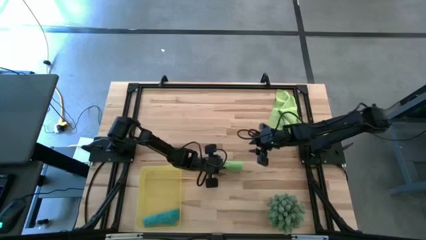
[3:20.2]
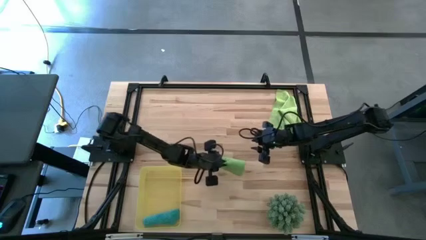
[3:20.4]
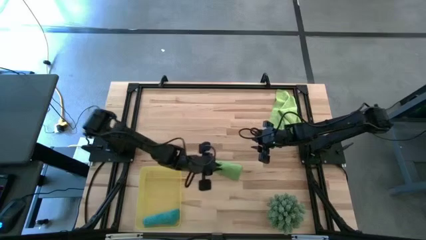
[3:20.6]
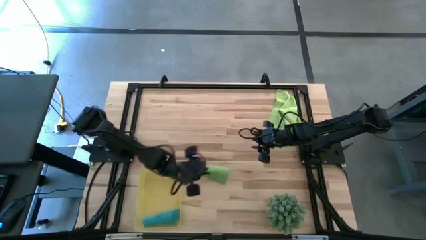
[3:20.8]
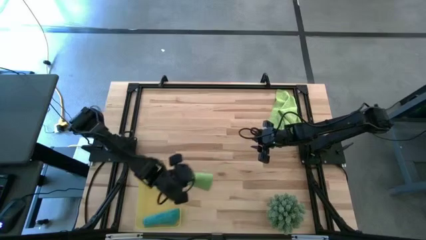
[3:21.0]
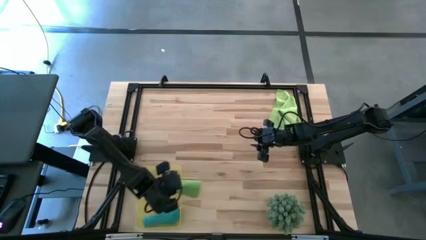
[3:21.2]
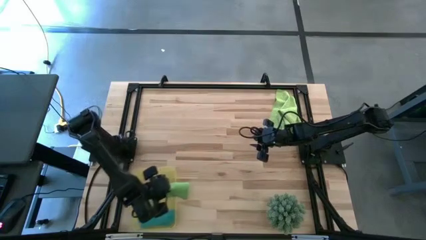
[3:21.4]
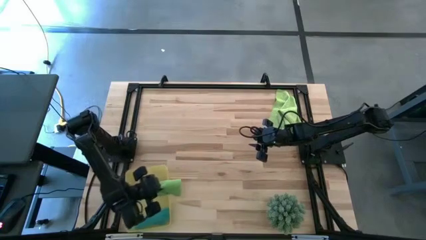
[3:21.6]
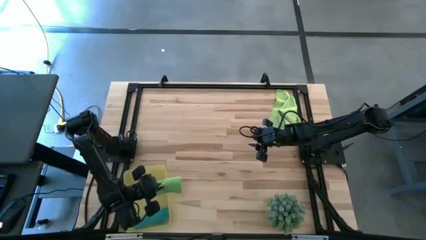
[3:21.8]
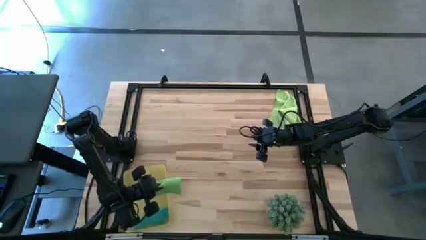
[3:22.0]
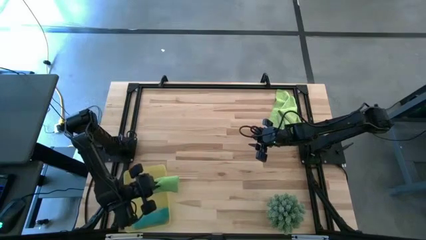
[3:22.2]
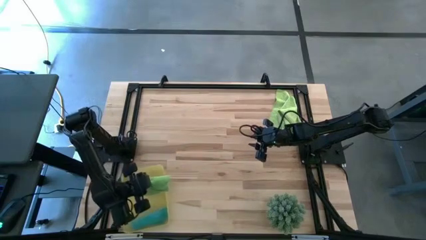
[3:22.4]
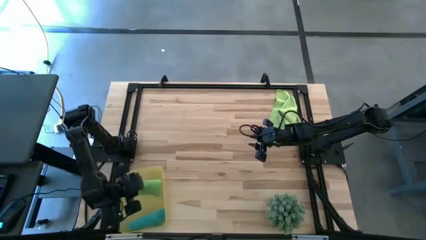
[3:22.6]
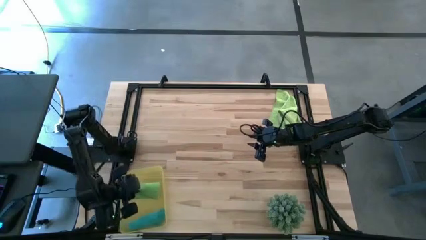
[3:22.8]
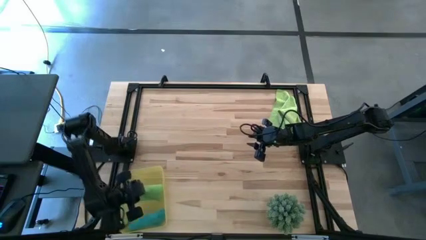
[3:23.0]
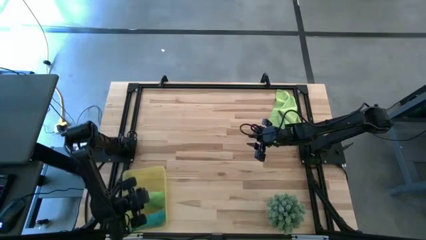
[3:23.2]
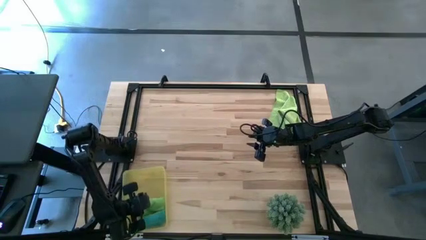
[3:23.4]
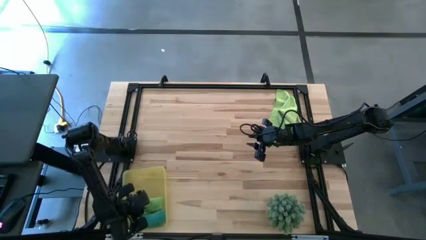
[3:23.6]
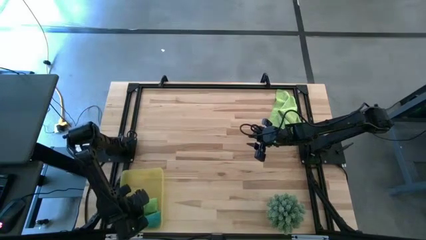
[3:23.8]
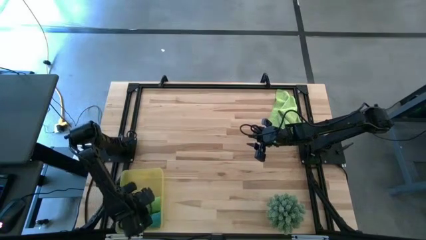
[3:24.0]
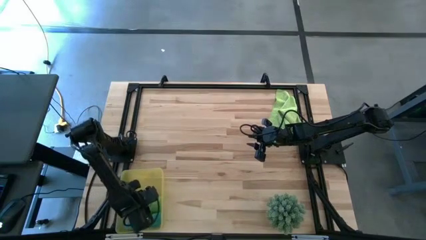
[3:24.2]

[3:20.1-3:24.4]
Task: Roll microfiber towels into tight, uniform cylinder then place into a basket
Put the green microfiber towel into the yellow bin

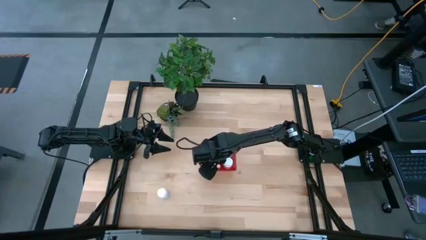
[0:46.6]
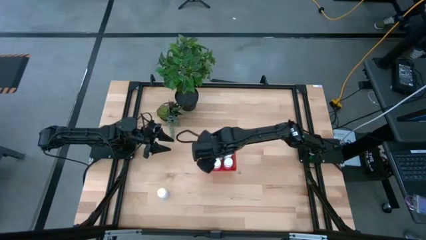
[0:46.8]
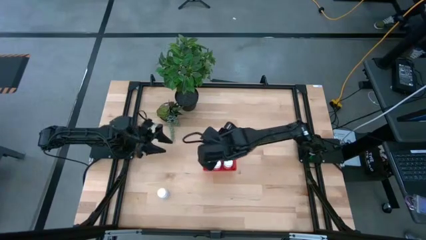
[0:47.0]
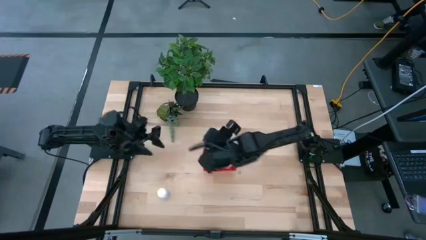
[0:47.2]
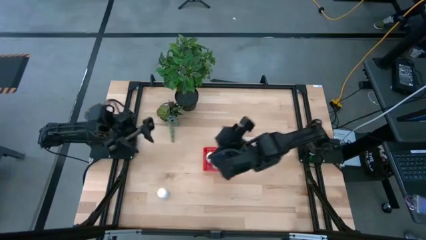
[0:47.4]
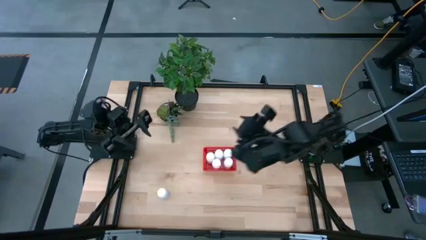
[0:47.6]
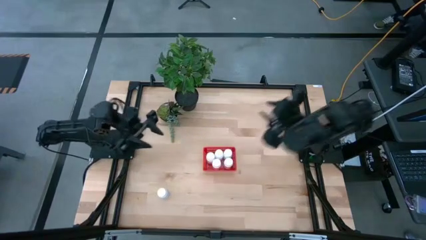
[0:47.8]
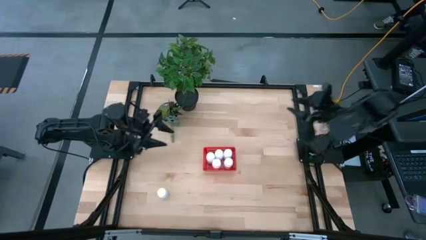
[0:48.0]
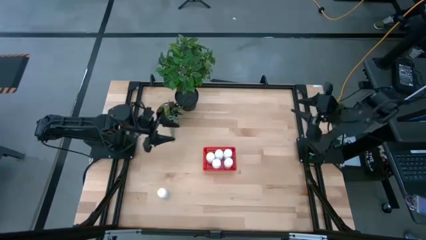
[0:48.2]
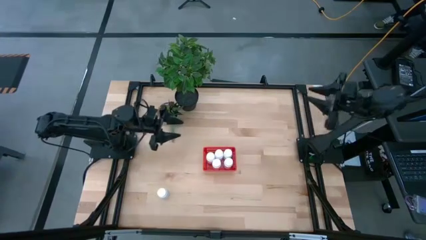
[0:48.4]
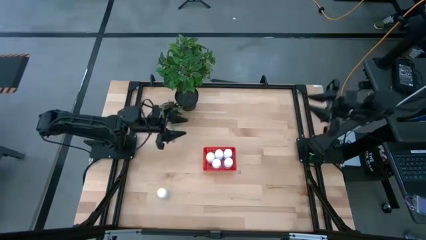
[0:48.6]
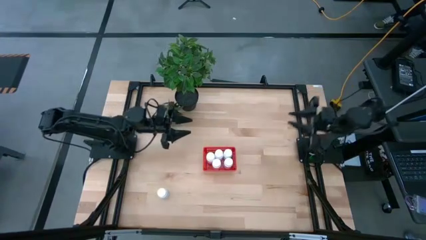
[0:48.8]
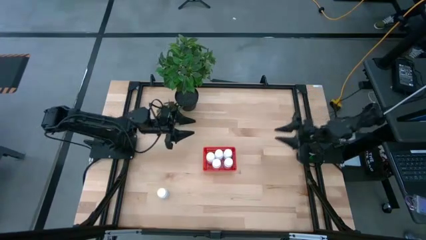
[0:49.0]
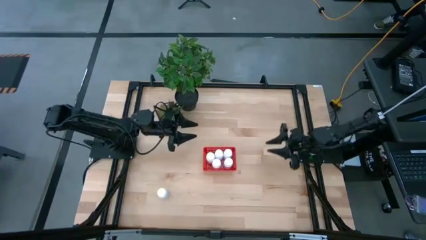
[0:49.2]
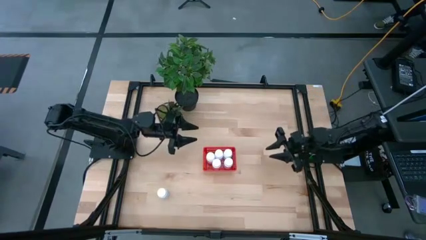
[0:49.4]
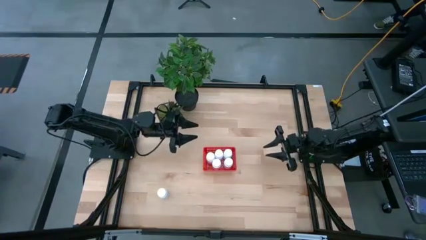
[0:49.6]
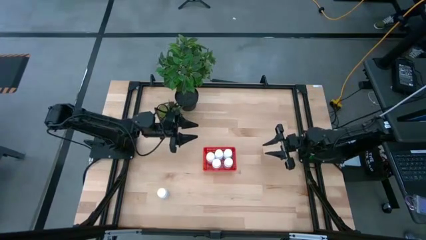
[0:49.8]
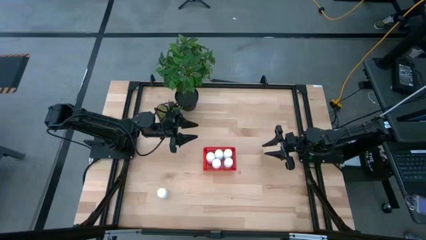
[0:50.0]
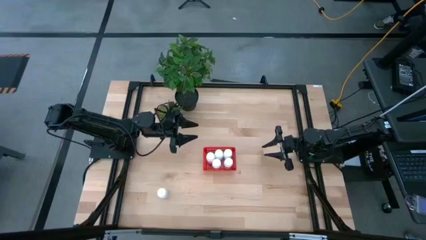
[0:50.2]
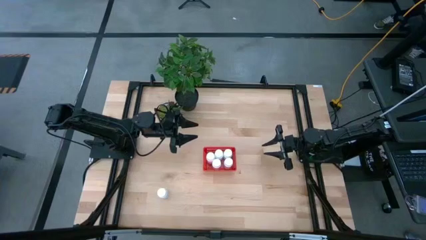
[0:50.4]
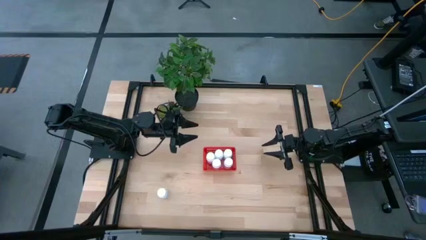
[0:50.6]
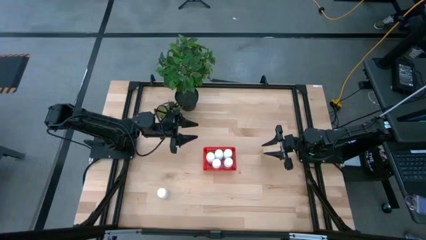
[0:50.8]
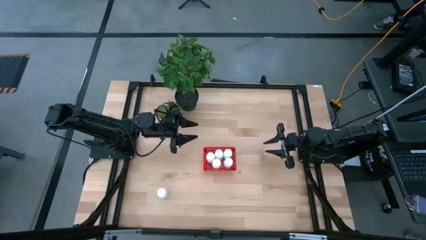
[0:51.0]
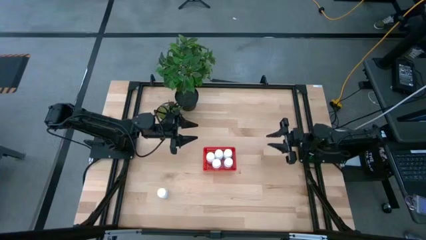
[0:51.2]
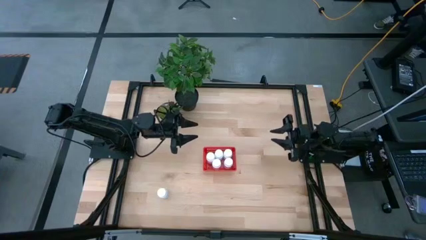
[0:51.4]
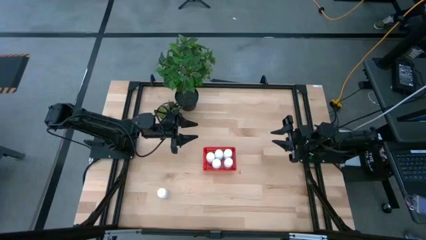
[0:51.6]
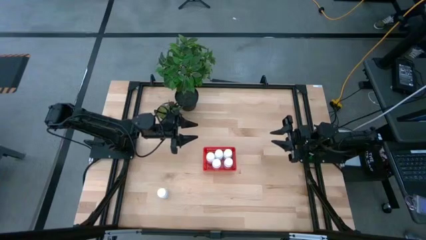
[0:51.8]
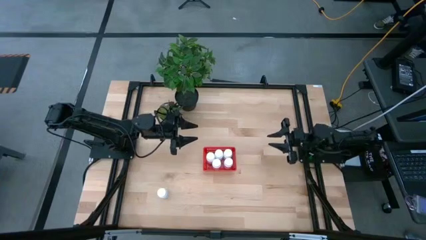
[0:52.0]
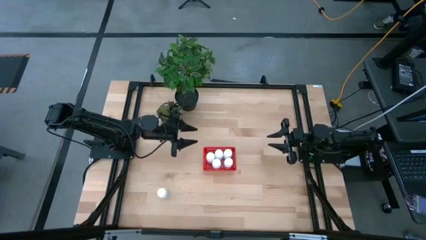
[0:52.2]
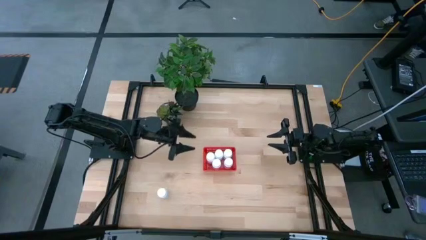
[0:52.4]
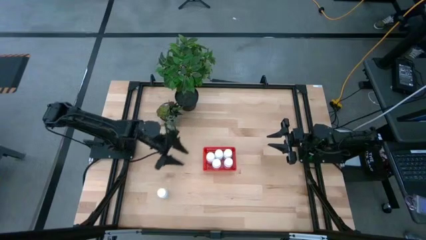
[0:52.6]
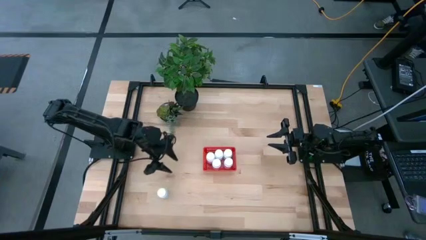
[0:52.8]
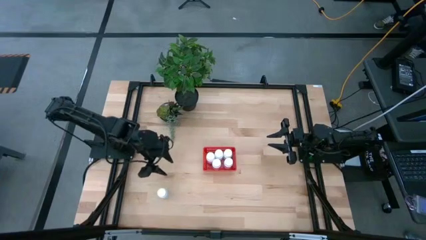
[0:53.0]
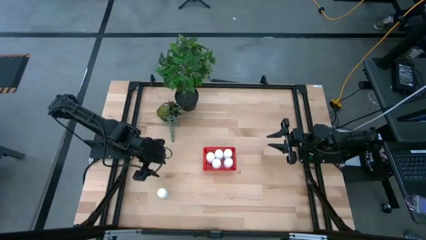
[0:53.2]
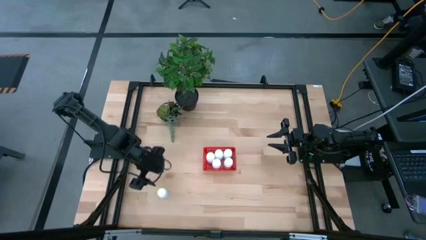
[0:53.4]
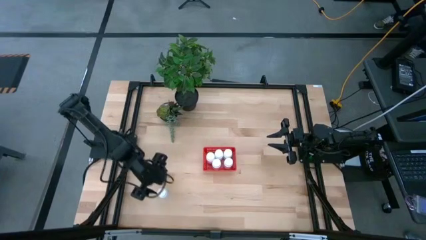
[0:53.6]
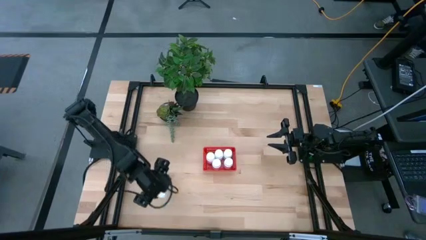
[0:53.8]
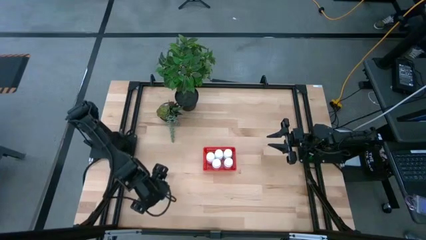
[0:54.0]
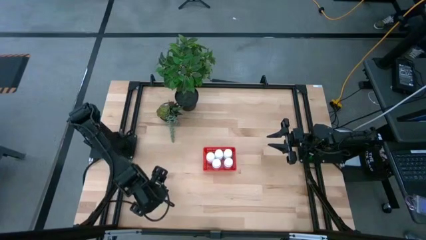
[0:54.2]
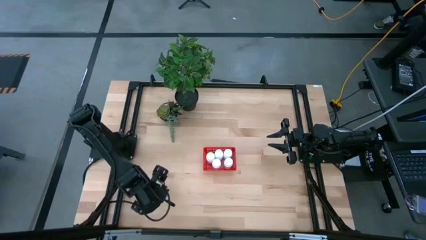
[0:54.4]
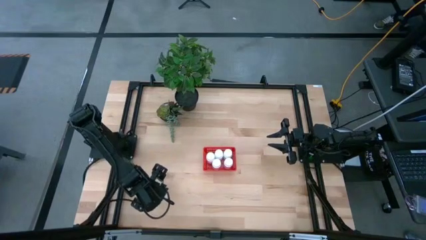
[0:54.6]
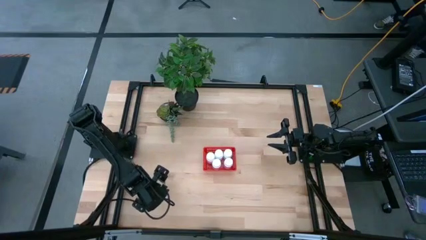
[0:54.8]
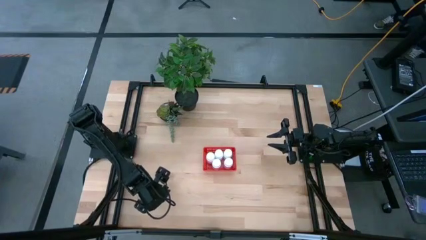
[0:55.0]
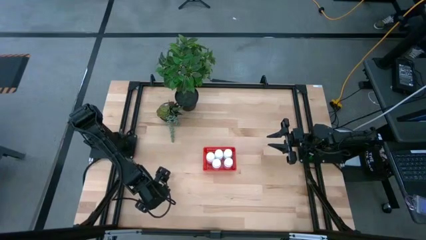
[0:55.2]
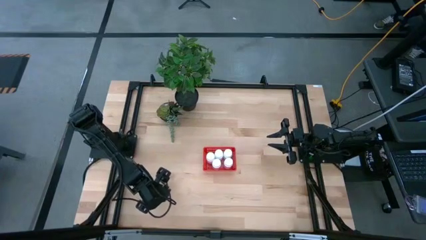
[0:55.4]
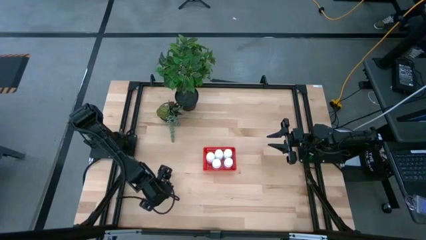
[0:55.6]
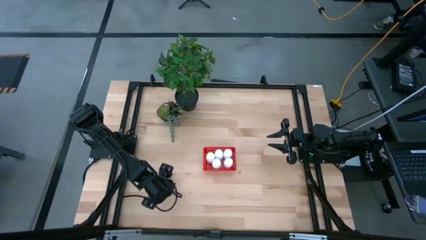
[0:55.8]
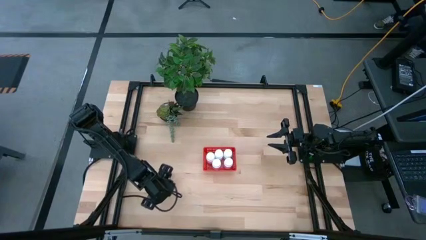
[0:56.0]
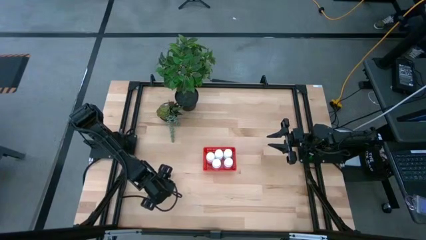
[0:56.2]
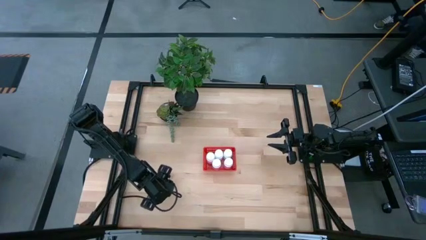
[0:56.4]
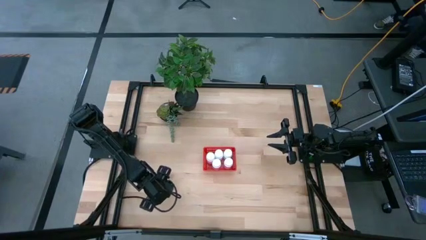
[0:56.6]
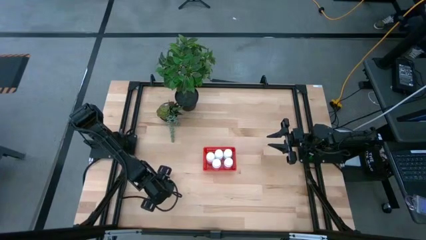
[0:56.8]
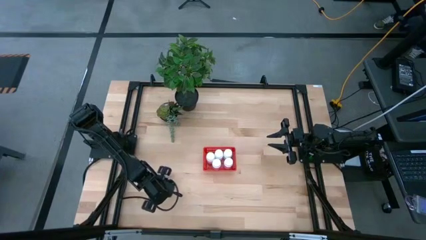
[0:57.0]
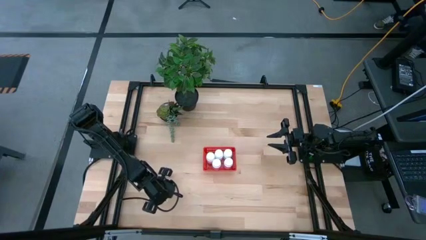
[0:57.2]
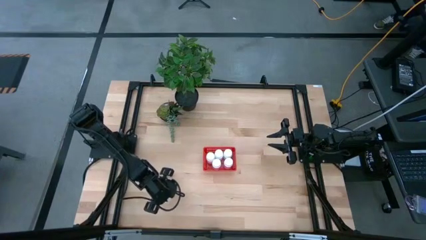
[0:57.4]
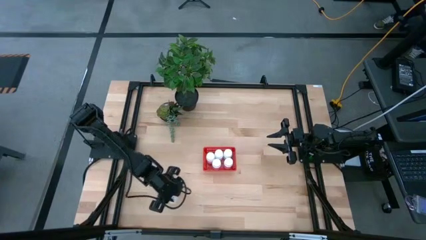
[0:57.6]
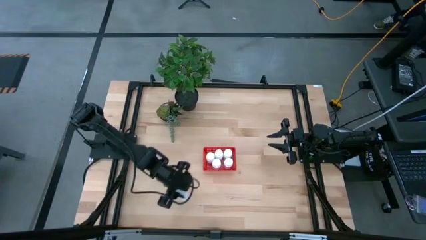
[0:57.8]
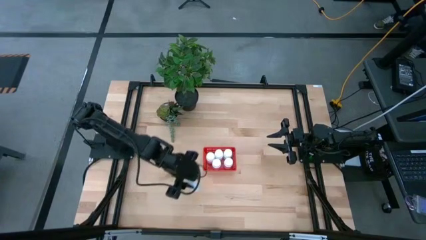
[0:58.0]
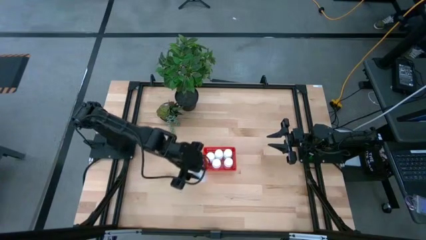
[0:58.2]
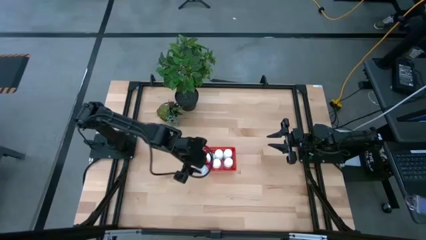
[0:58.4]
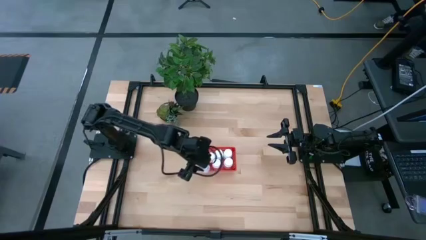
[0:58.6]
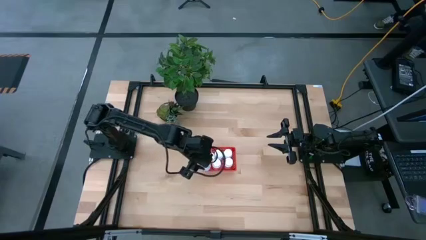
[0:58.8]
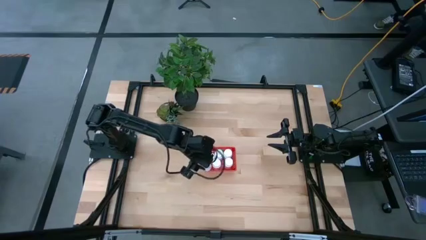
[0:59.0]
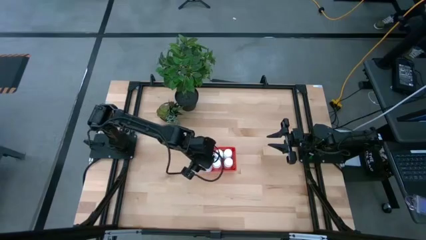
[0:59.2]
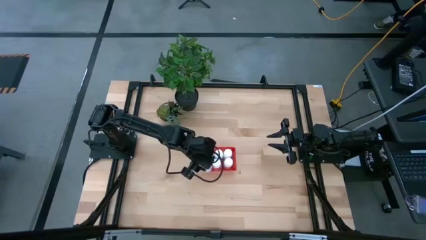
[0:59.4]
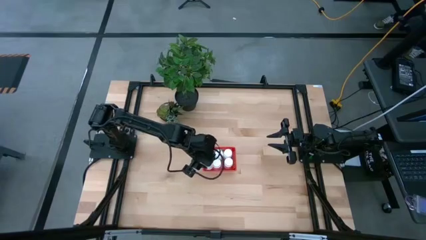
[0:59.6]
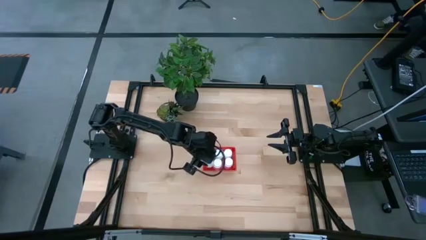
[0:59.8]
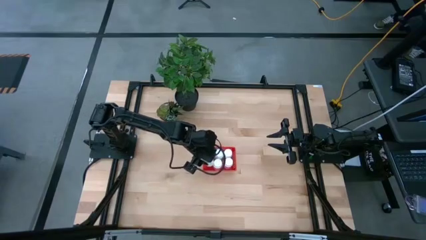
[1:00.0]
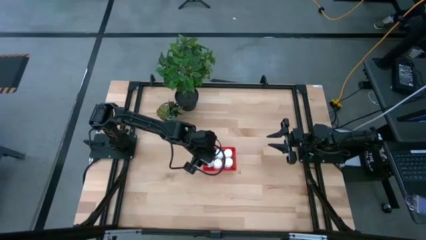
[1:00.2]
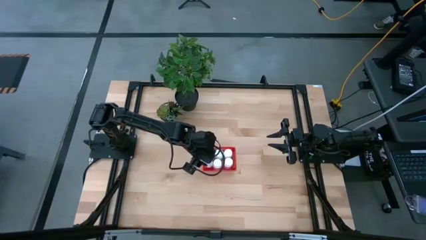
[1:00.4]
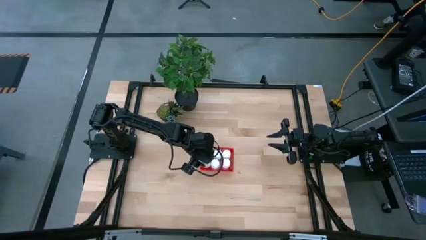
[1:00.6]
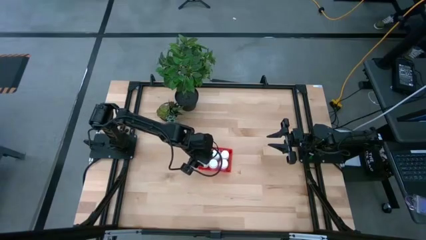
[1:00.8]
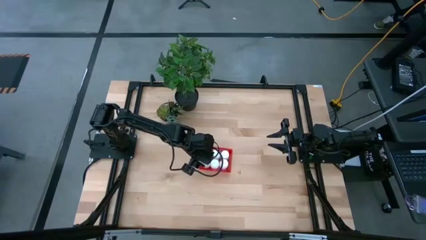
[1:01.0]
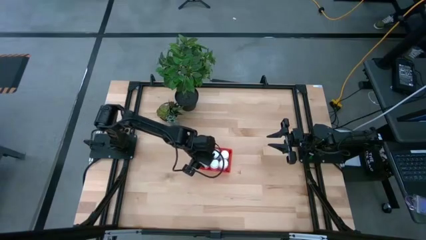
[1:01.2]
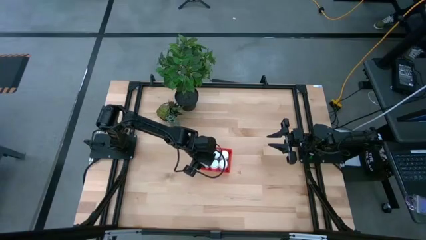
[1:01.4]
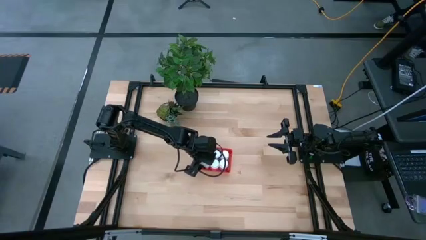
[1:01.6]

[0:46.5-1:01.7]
Task: Pick and place pill bottles into a basket
Put the white pill bottle into the red bin
